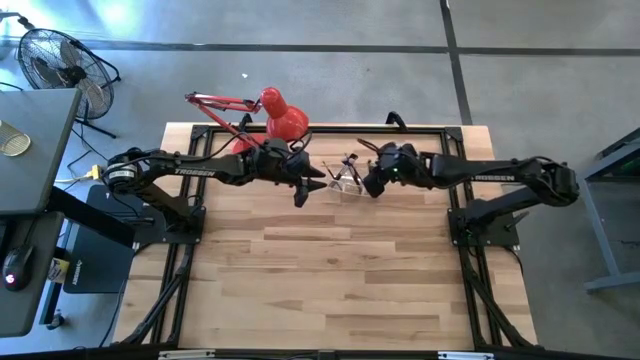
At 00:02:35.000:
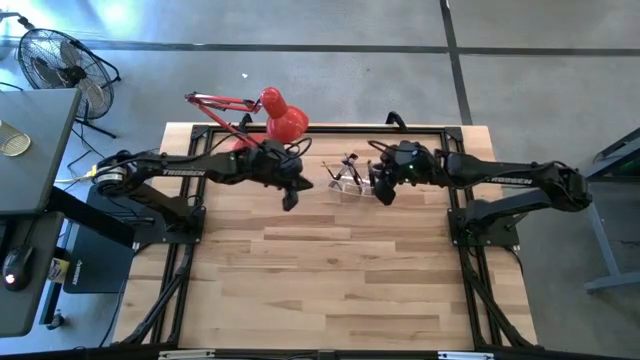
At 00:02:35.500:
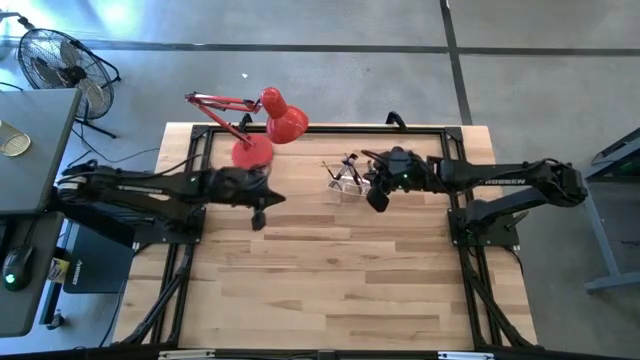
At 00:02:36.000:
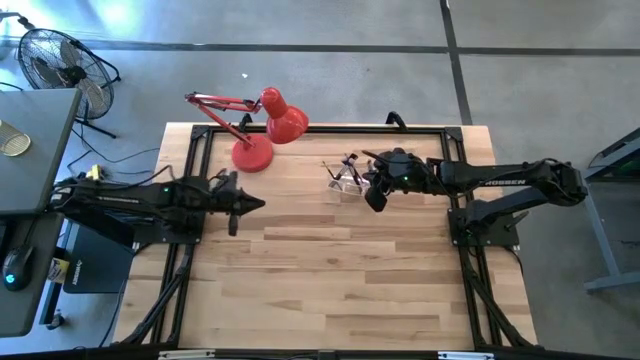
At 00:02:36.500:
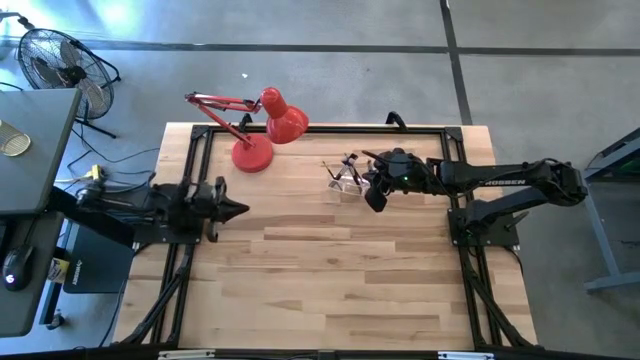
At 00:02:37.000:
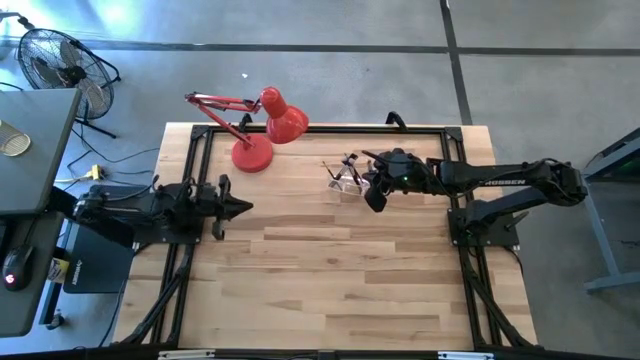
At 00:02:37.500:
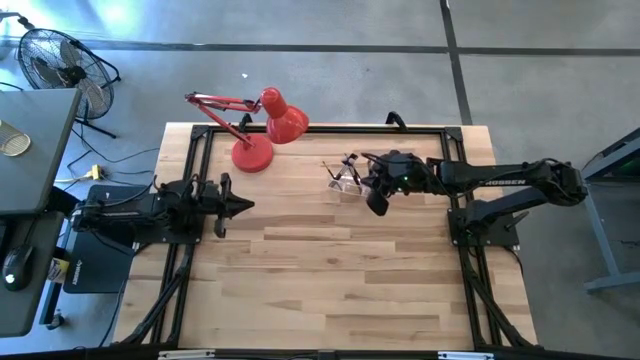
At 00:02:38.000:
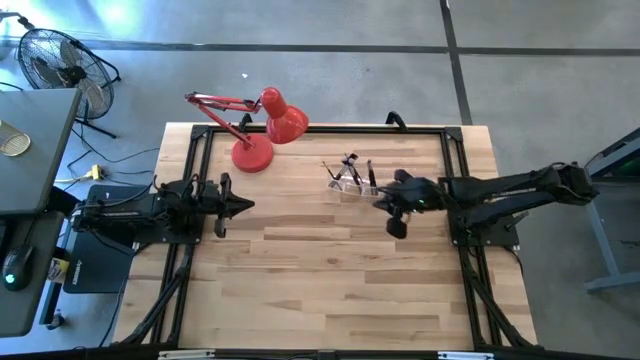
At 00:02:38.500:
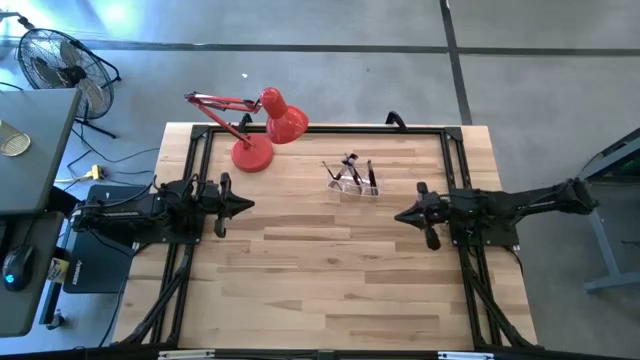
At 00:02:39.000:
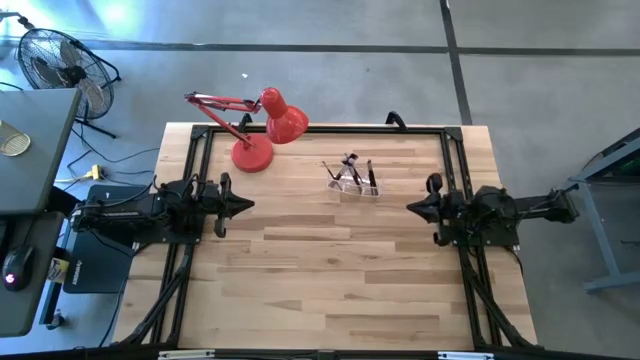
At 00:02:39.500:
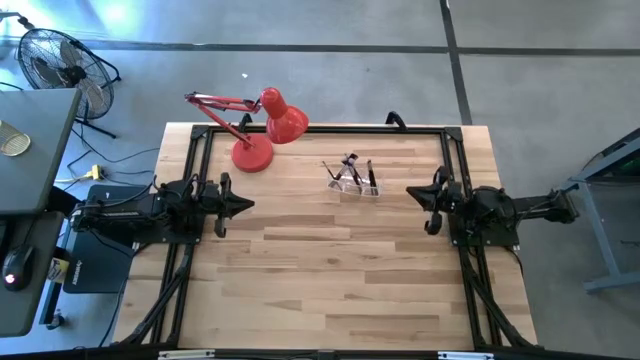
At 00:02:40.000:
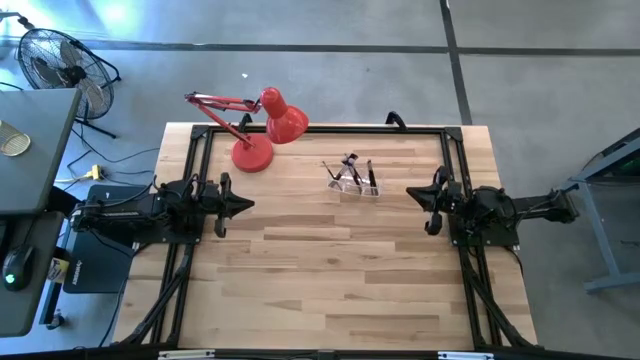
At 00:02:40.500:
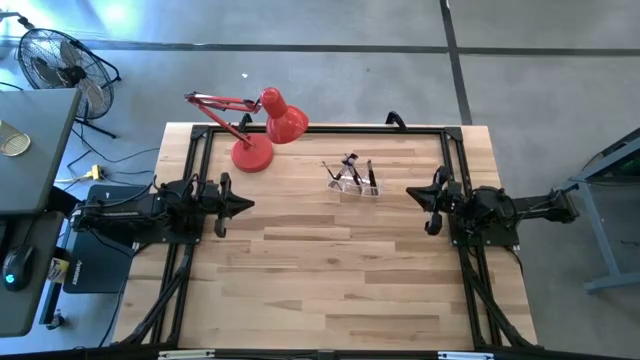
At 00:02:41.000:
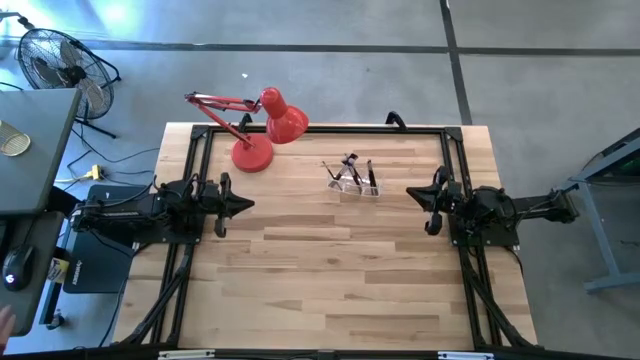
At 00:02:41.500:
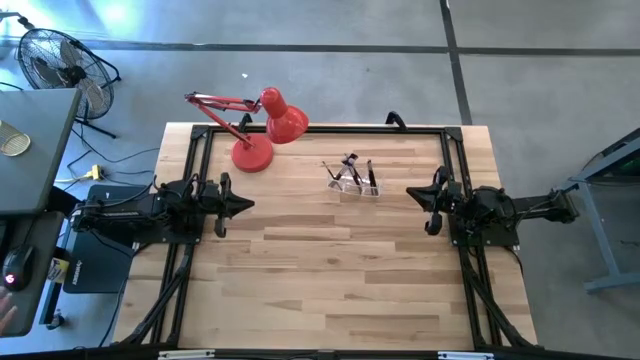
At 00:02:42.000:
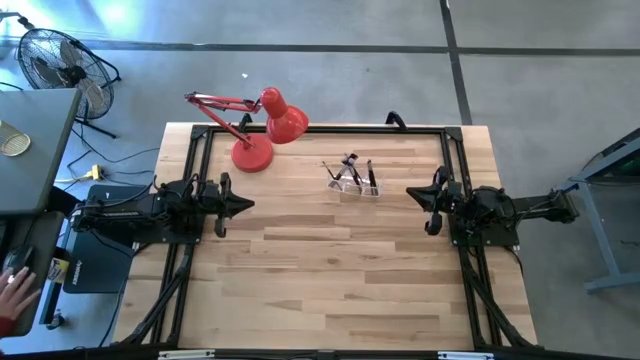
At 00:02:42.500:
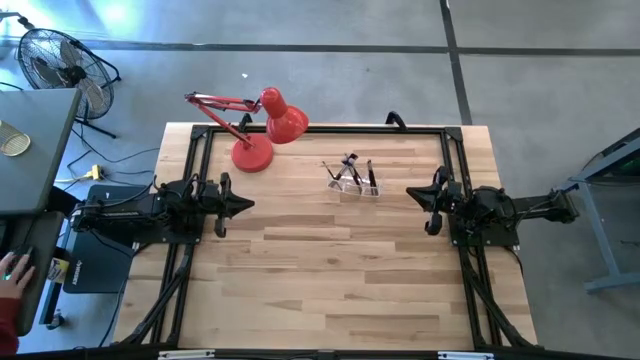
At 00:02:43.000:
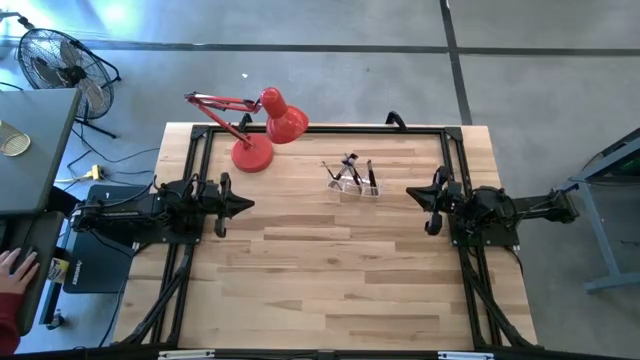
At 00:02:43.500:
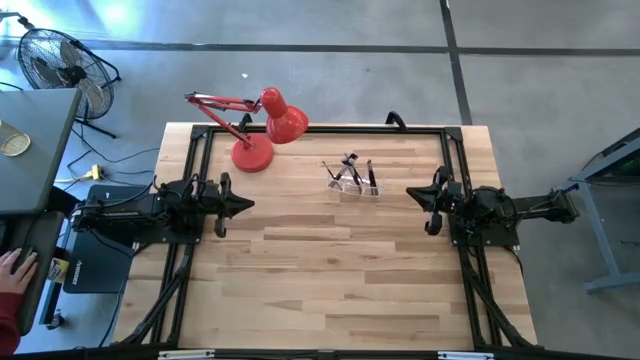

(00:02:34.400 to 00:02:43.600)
Task: Put items in baskets/containers
Return to Home Position

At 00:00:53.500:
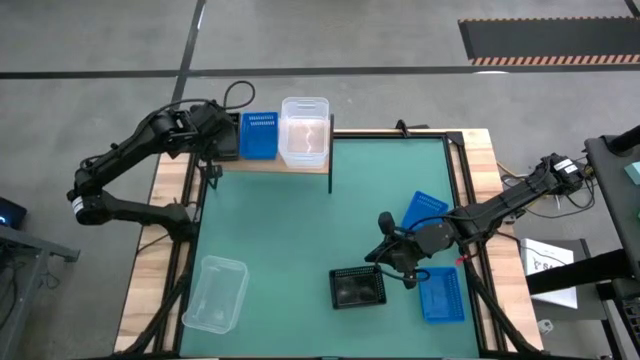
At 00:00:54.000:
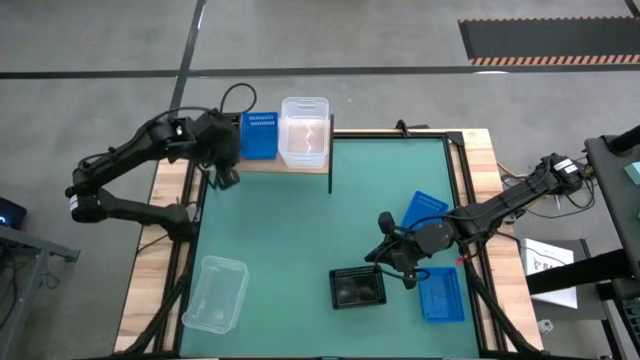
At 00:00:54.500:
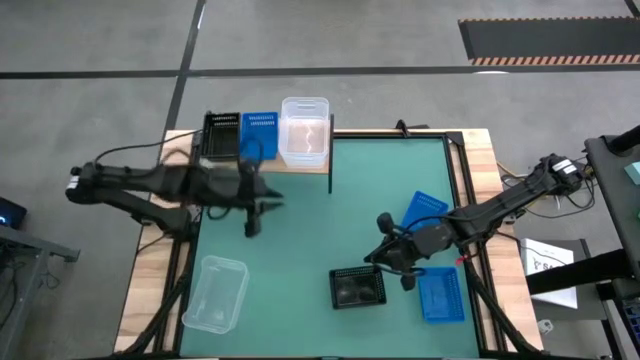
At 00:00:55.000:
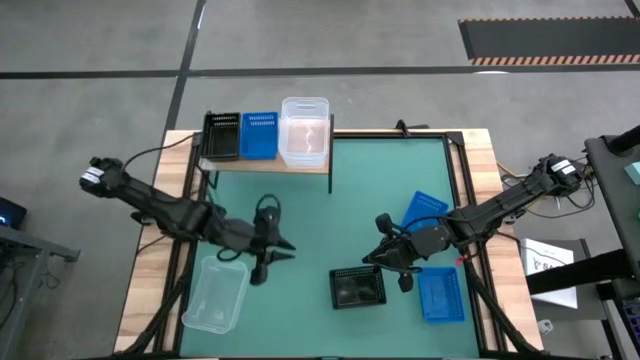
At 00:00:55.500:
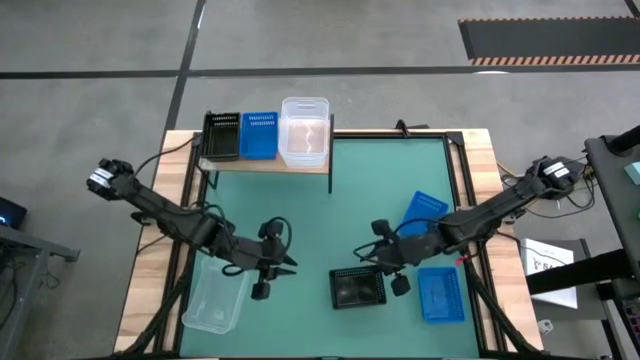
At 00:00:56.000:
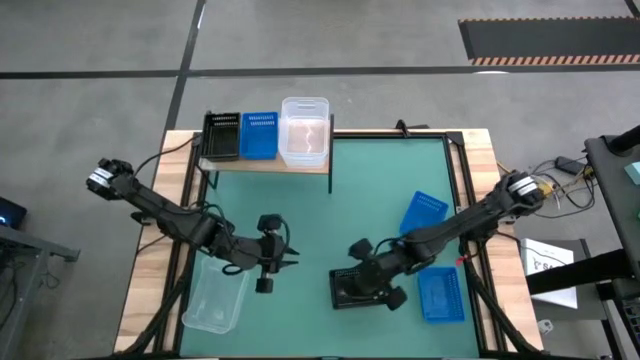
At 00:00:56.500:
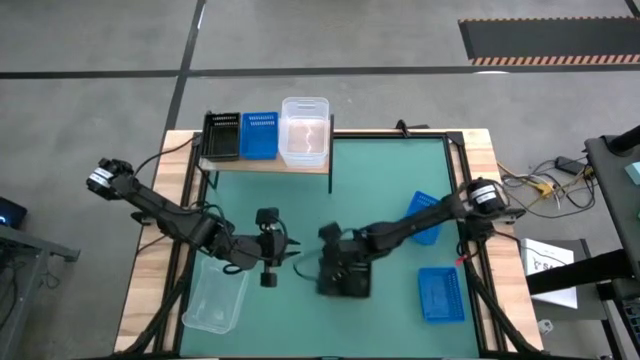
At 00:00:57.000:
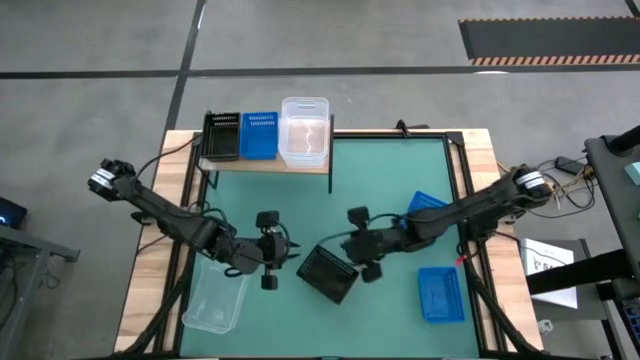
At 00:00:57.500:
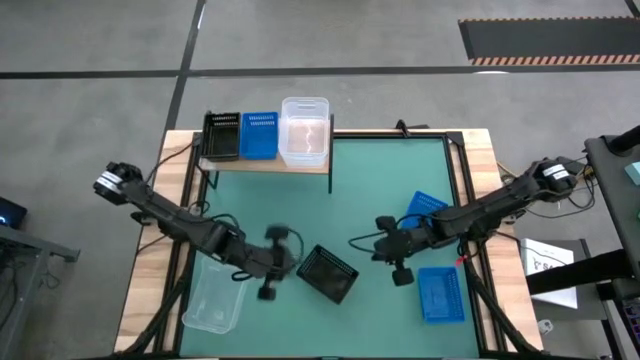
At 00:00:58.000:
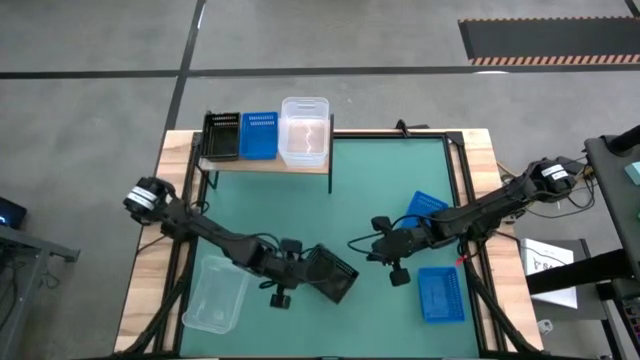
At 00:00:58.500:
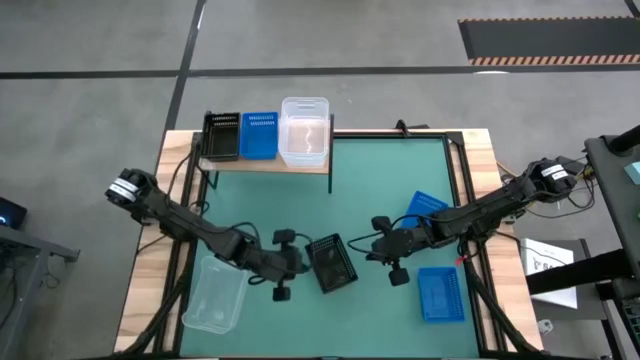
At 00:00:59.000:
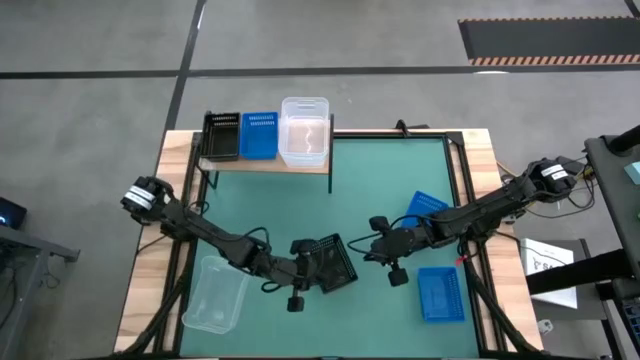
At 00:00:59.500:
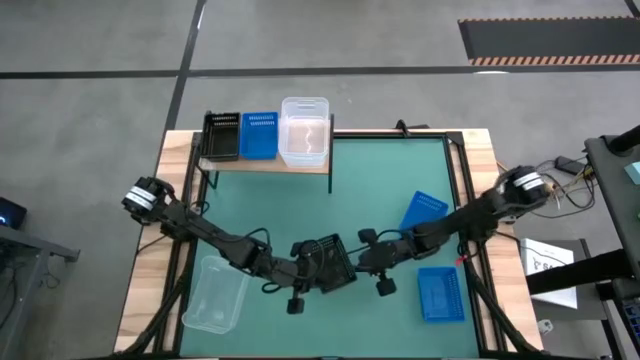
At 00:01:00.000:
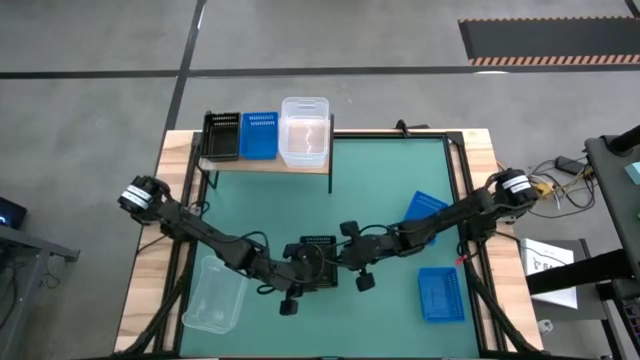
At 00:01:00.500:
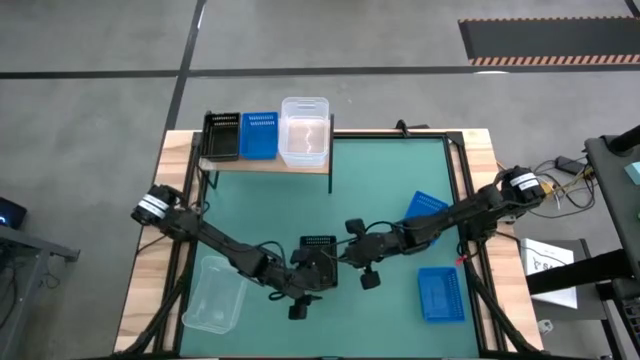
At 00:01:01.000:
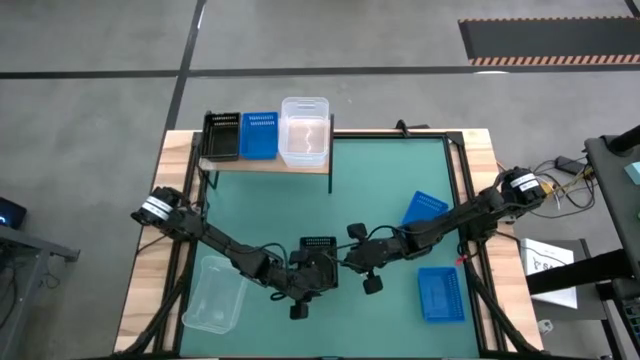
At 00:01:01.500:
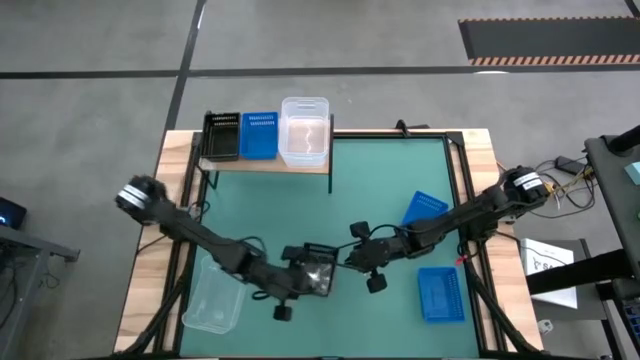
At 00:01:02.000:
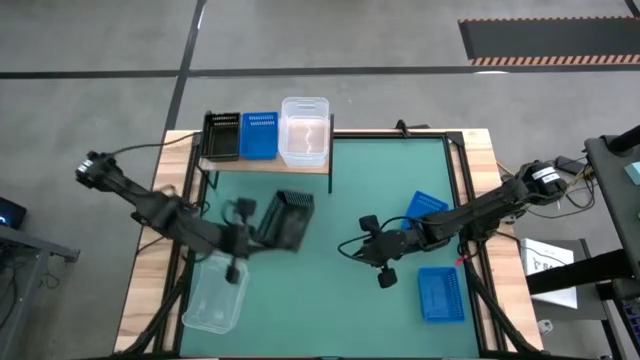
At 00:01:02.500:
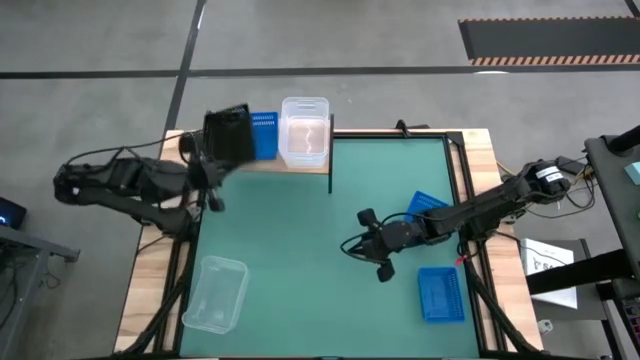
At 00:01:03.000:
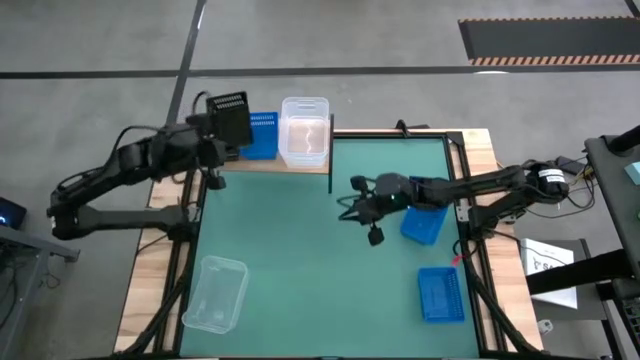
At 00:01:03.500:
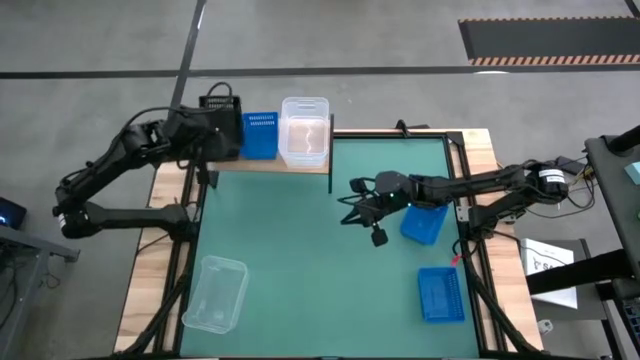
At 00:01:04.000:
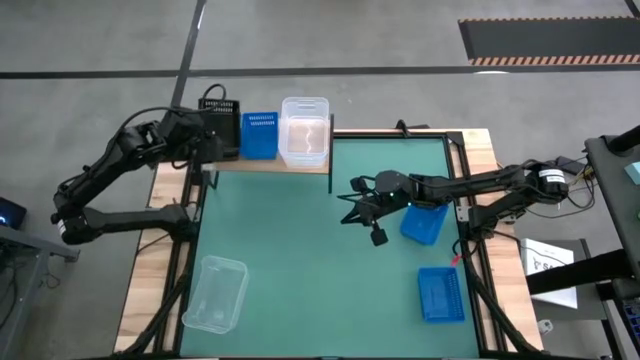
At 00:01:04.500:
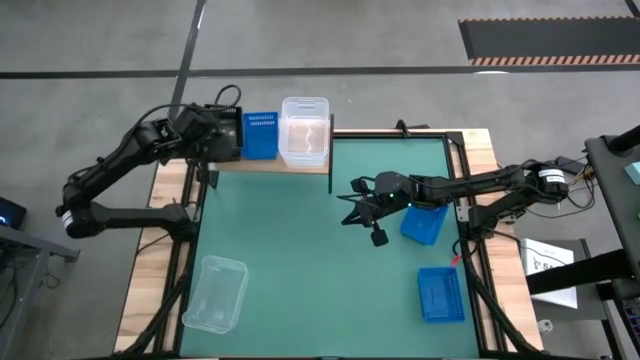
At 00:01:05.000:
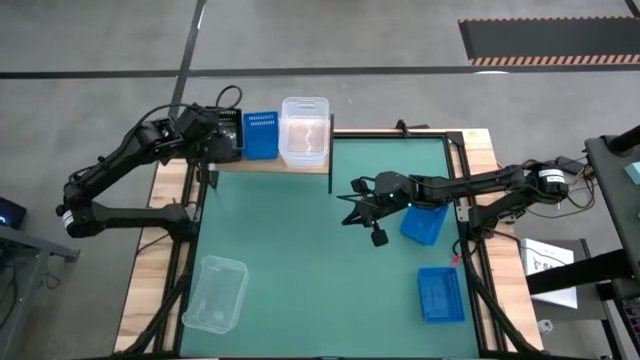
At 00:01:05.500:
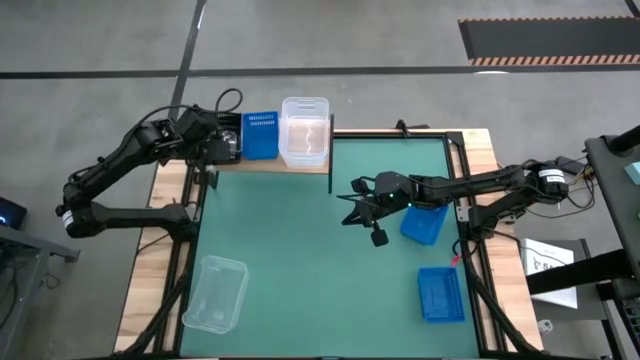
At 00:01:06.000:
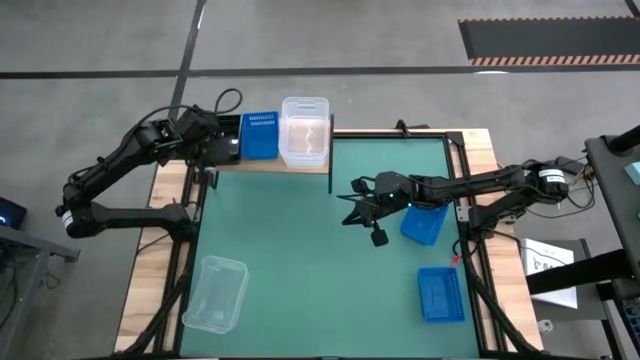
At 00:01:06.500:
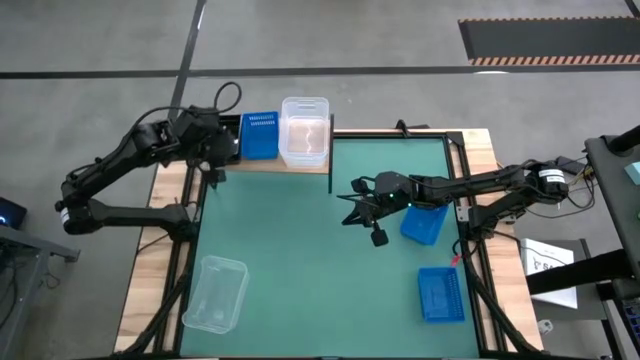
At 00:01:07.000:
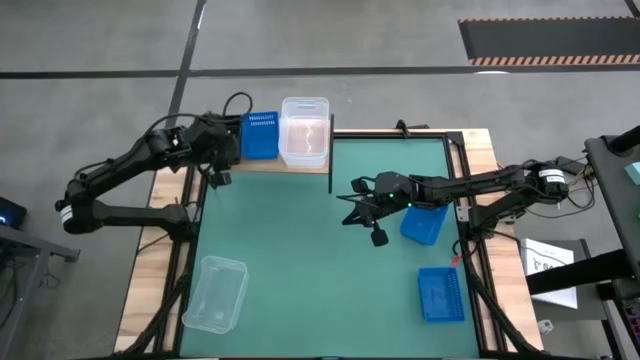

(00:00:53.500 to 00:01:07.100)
Task: Stack baskets on shelf by color
Stack the black bin on top of the black bins on the shelf
